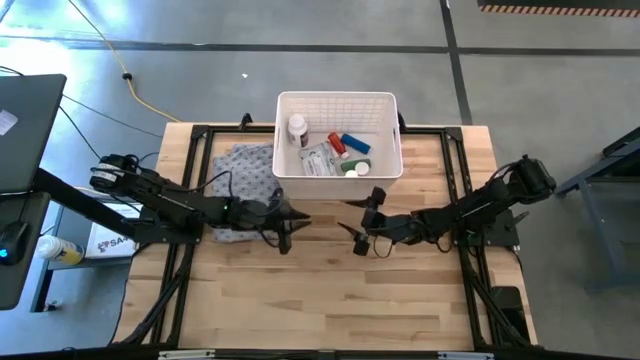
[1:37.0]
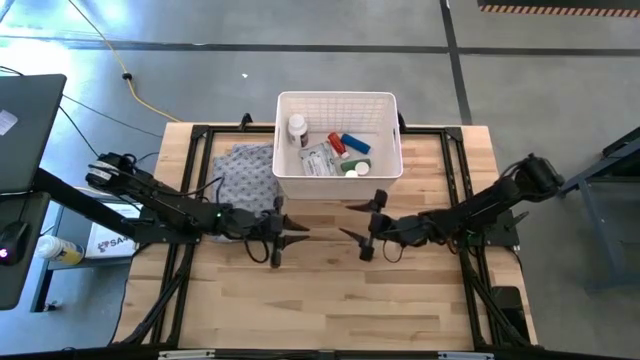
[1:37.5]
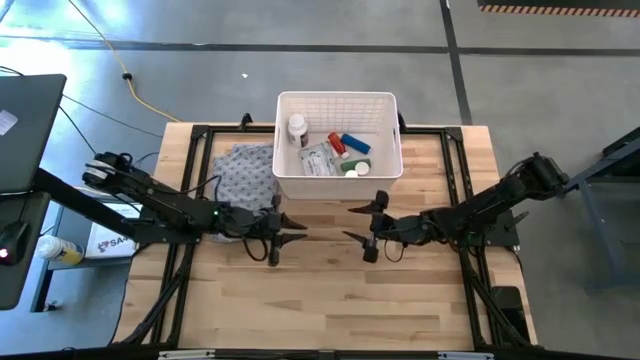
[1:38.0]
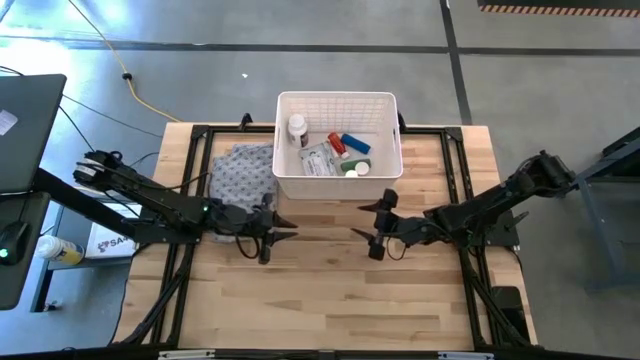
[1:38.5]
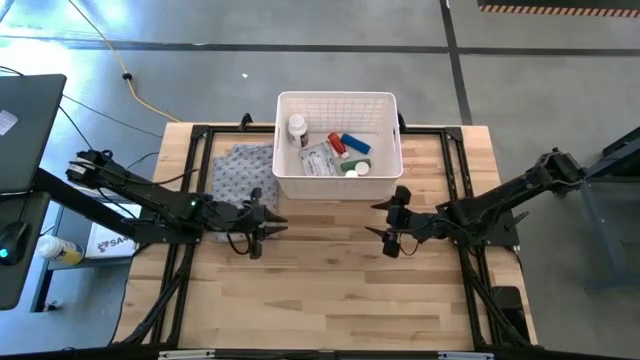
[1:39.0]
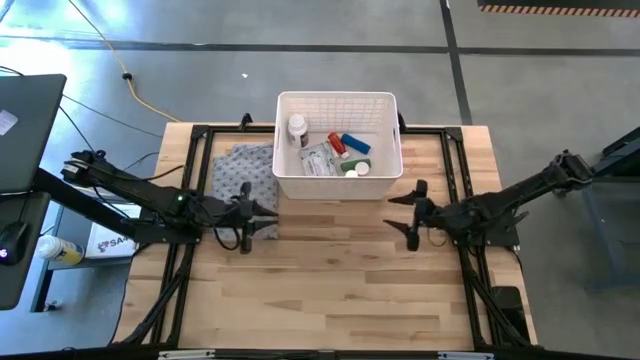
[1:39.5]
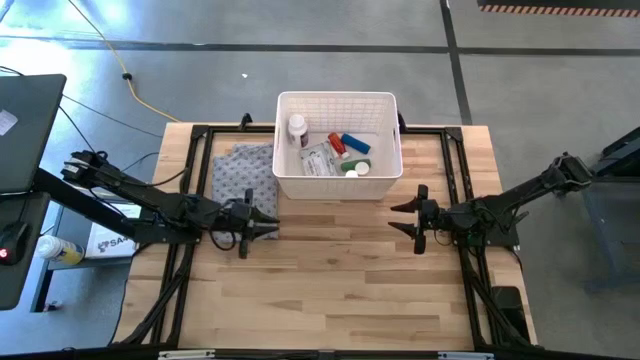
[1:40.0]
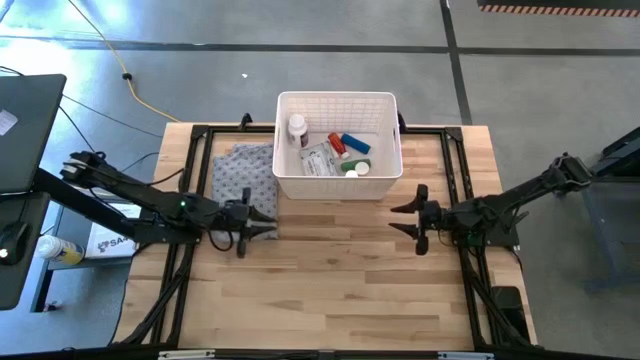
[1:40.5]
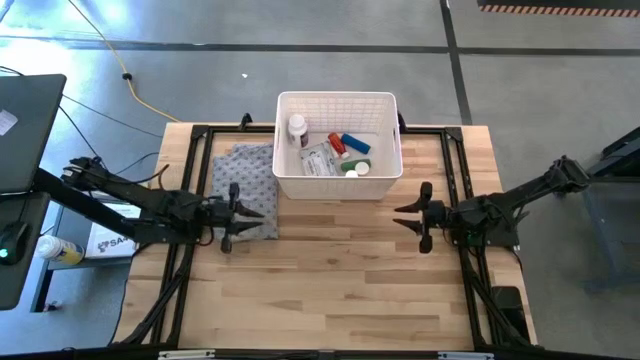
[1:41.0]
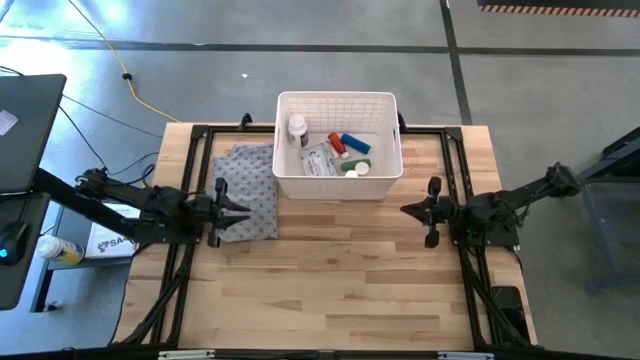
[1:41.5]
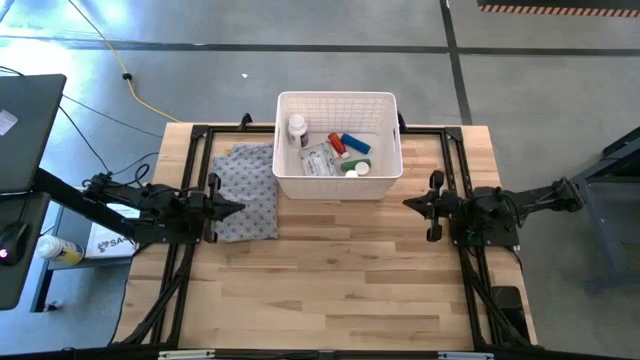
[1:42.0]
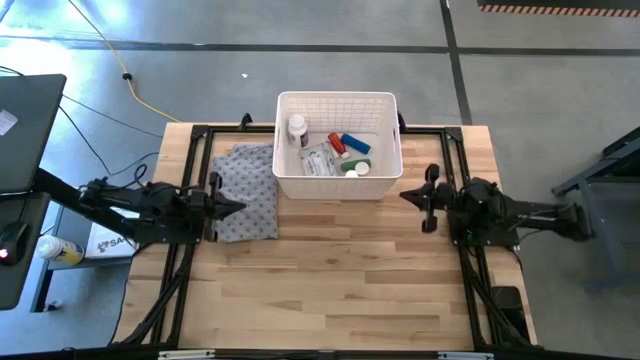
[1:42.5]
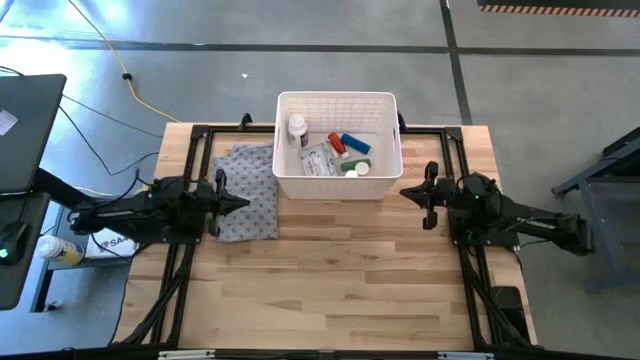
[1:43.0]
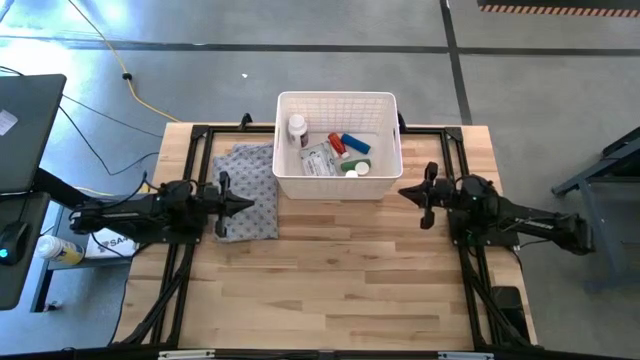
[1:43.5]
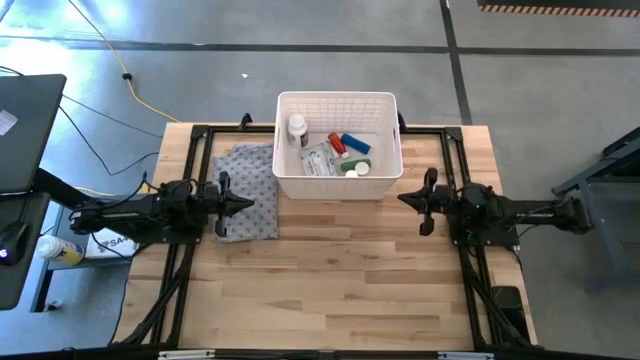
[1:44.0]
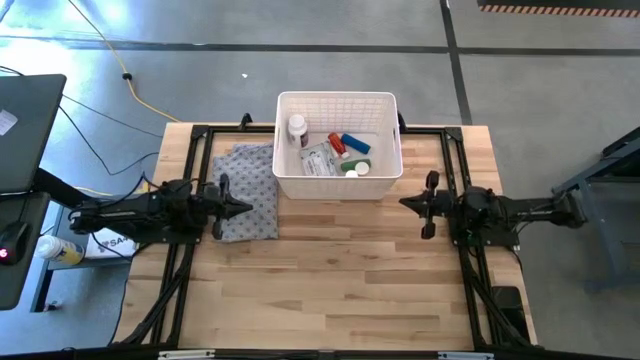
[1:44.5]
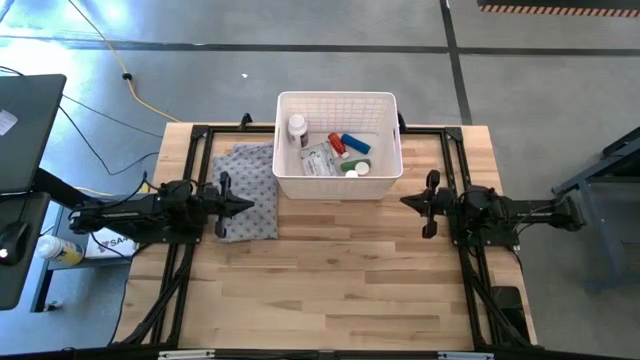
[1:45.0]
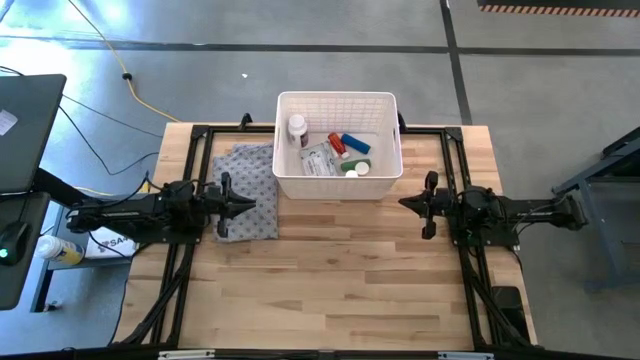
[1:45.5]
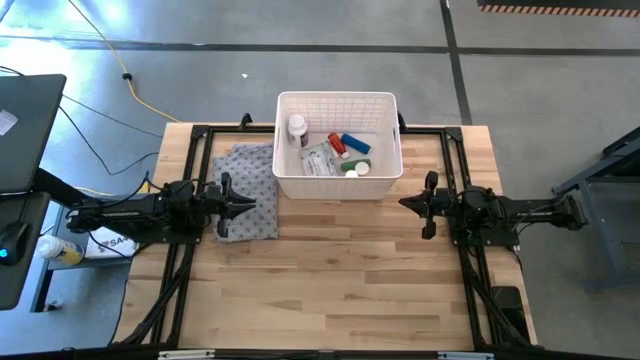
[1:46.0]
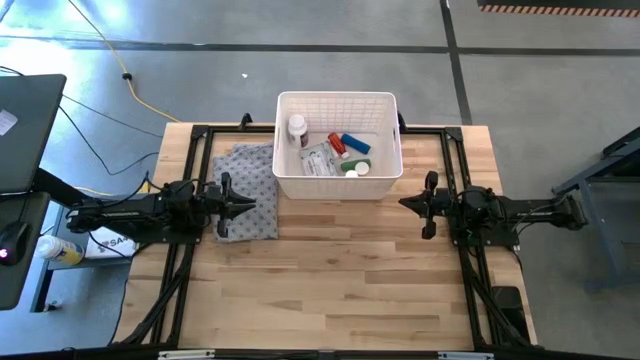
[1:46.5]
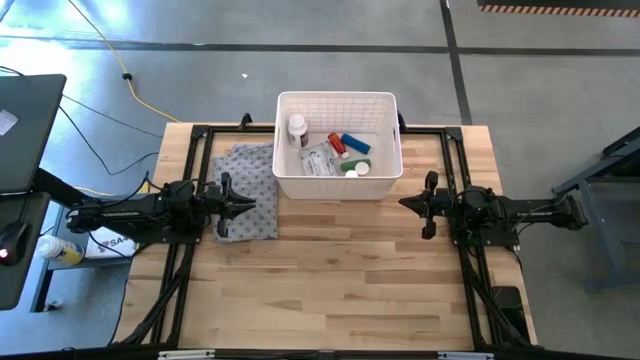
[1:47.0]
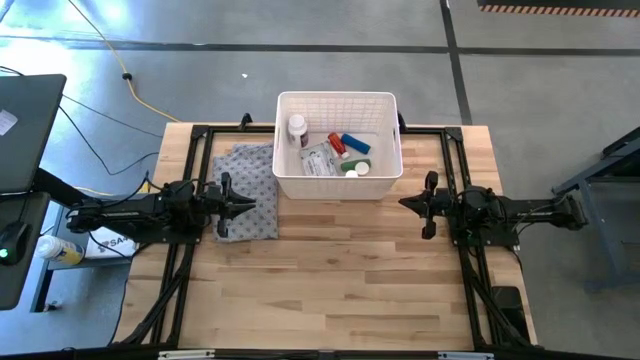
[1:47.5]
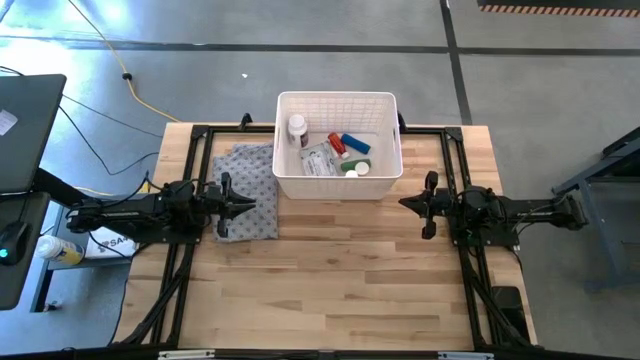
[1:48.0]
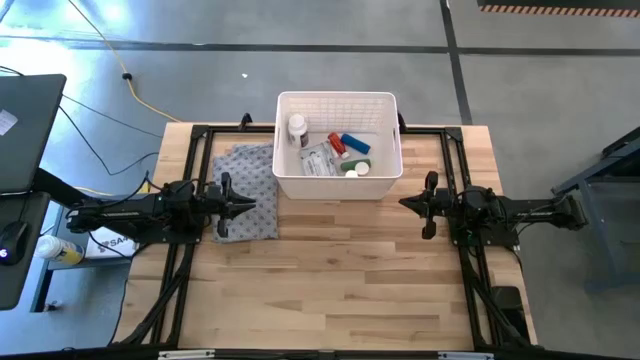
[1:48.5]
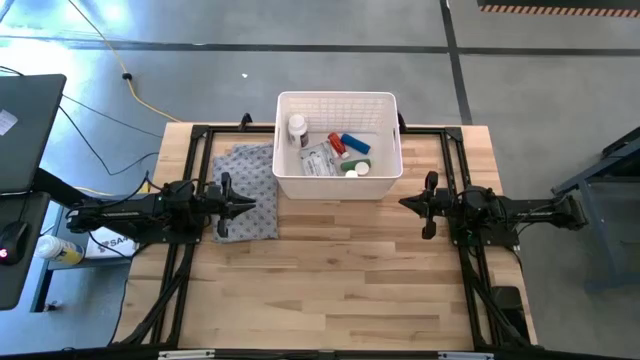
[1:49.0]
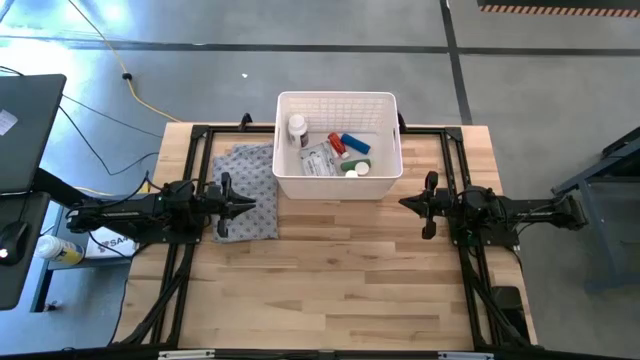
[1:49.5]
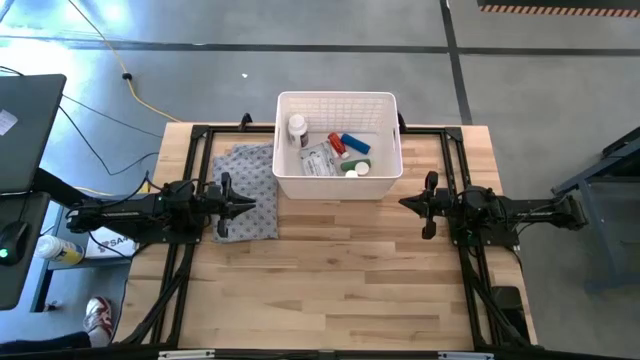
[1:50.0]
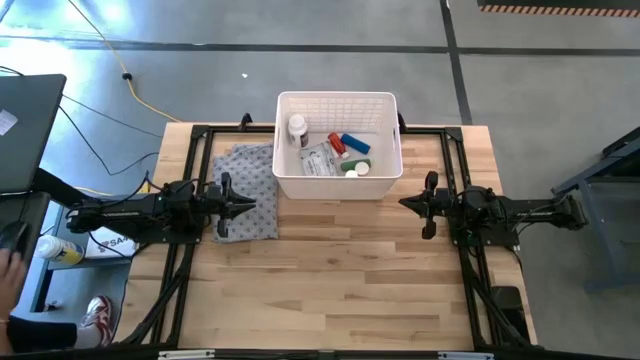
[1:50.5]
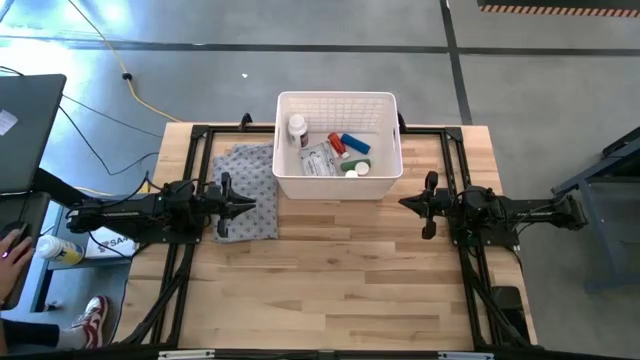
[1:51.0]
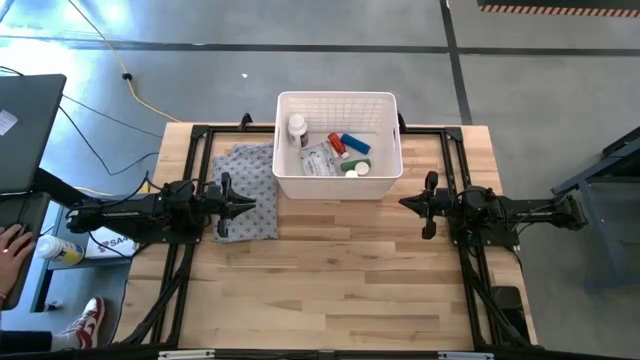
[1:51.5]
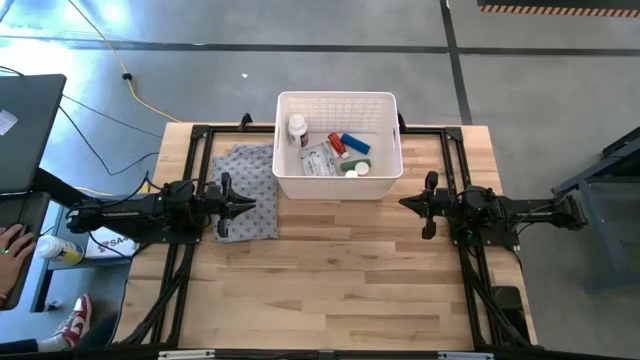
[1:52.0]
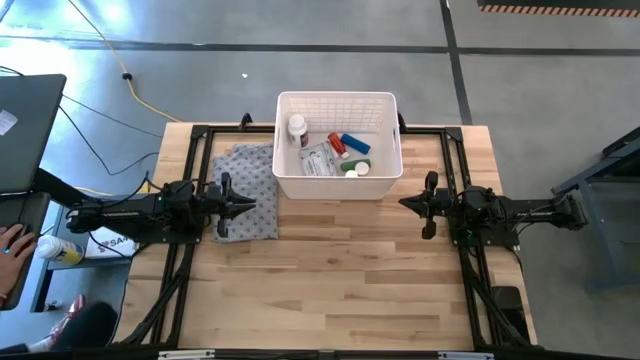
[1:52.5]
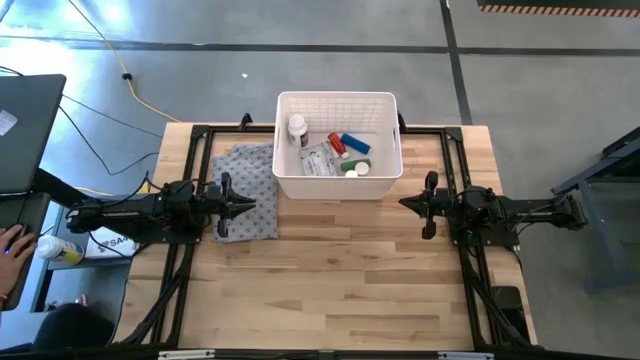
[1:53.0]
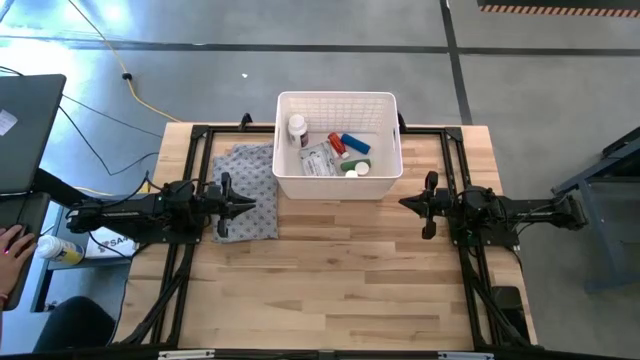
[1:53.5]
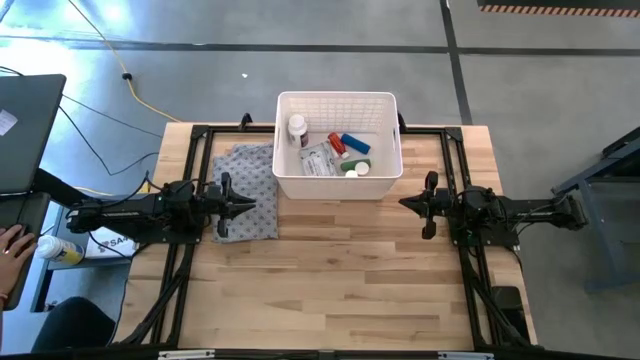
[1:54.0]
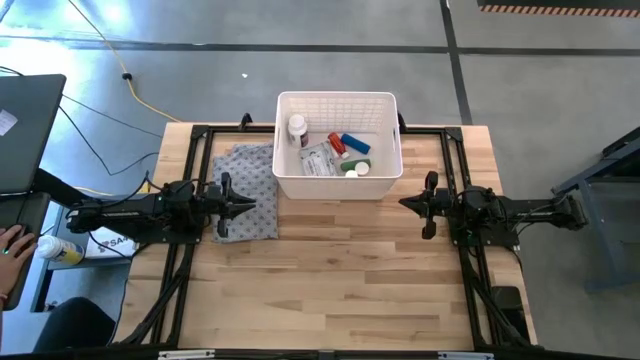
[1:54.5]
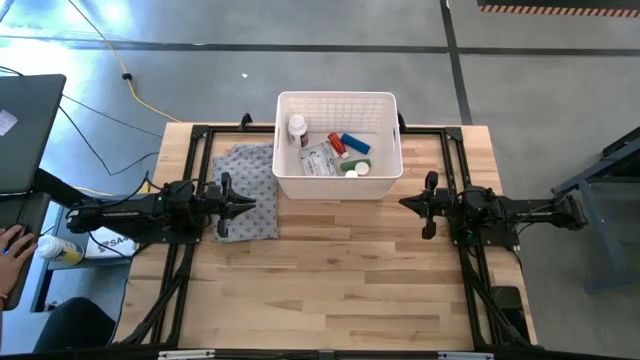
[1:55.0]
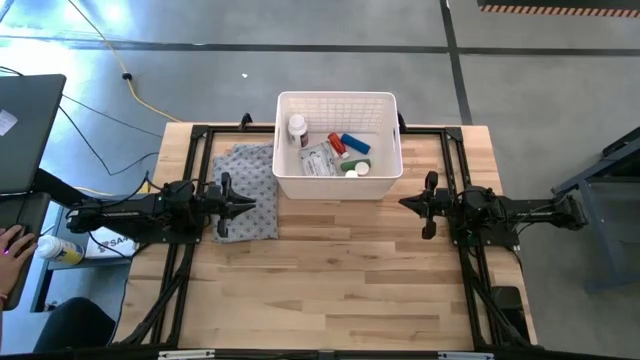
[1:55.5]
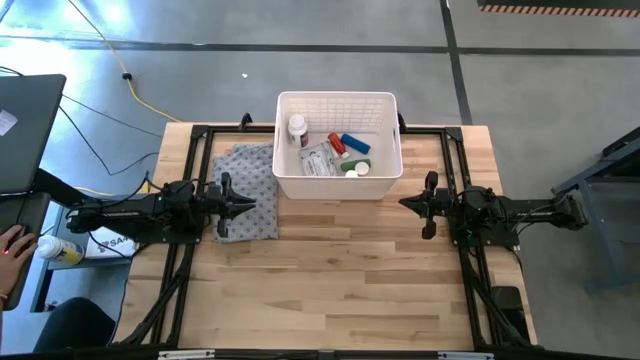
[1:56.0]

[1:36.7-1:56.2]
Task: Pick & place medical supplies in basket/bin
Return to Home Position

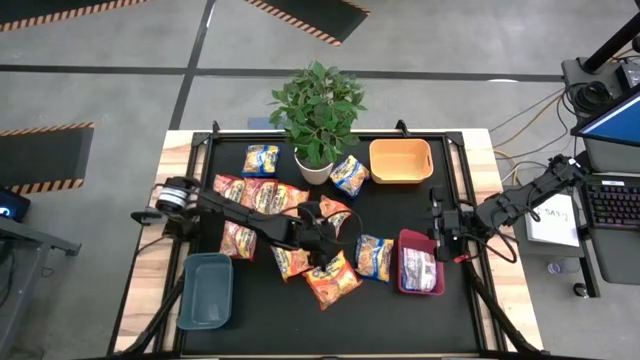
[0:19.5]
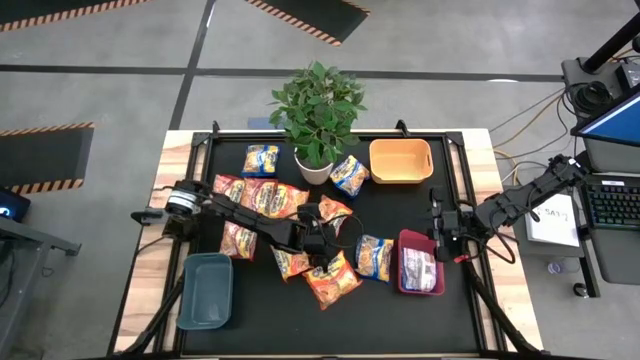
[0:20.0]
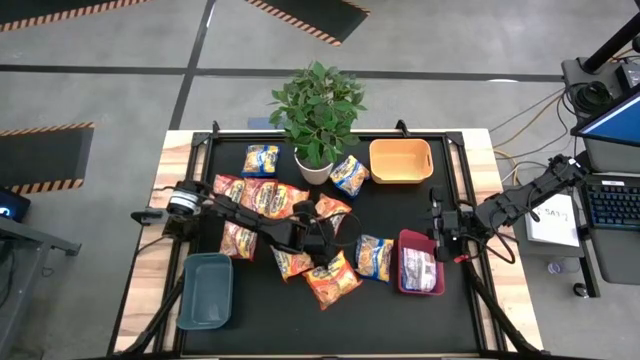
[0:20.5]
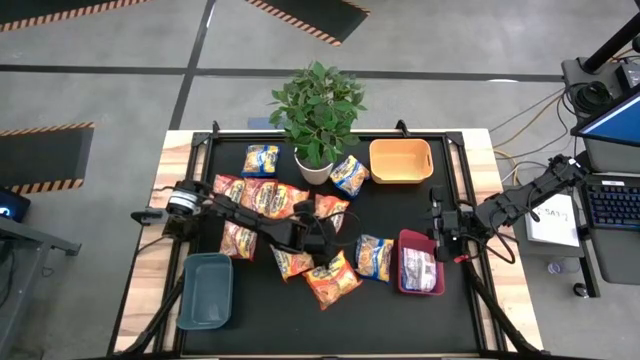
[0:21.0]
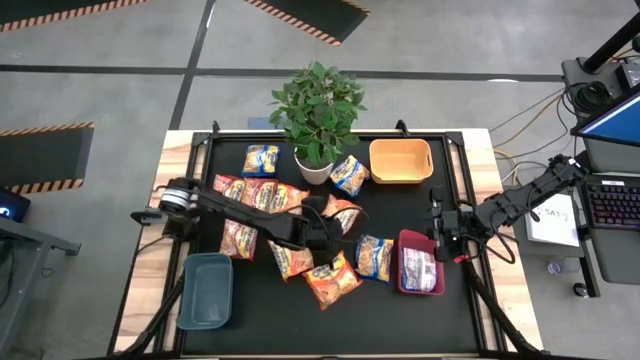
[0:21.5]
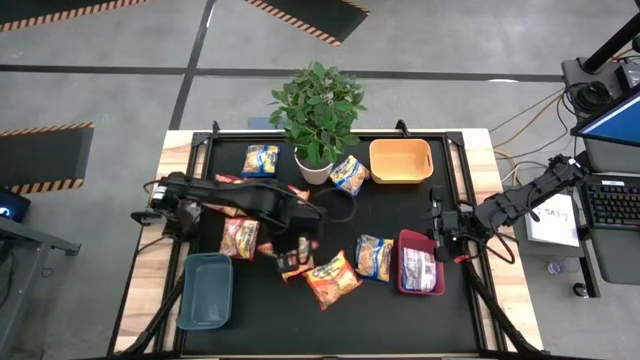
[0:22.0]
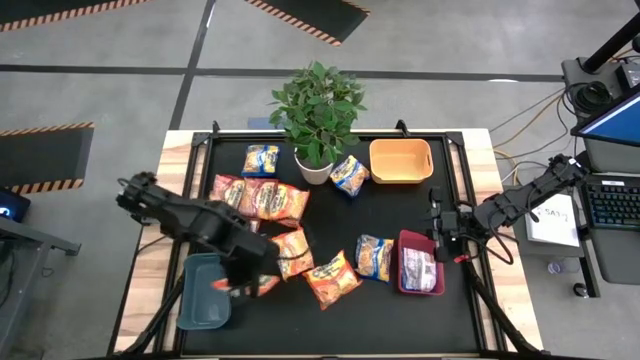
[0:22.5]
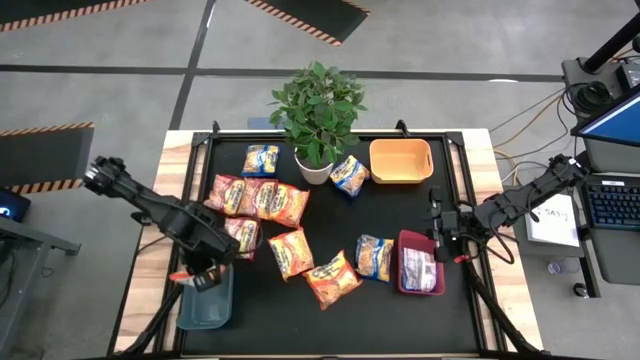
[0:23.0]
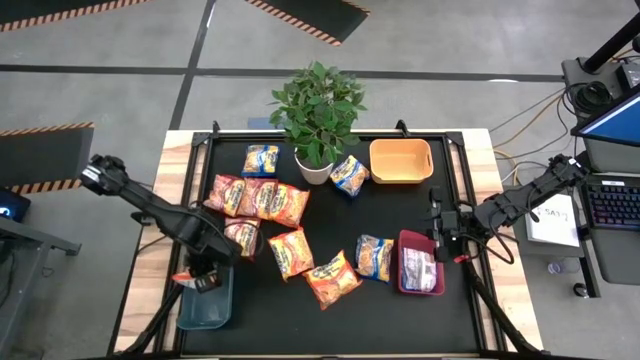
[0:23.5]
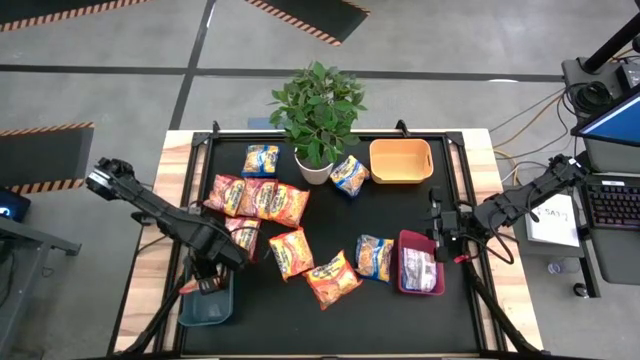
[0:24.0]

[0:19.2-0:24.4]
Task: Sort Maruchan noodles
Put the orange noodle pack into the blue bin
